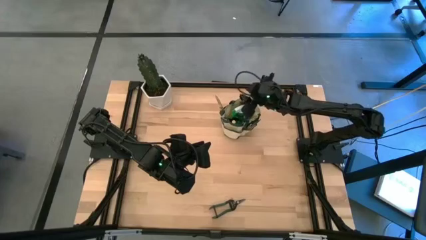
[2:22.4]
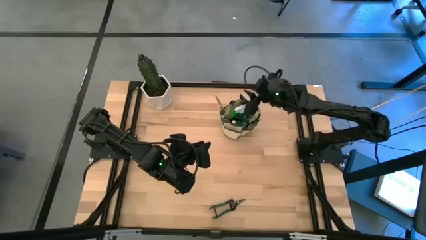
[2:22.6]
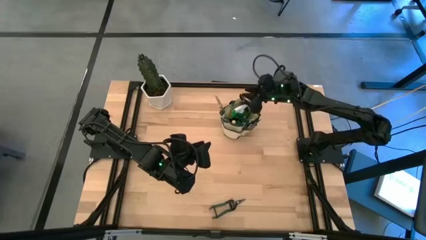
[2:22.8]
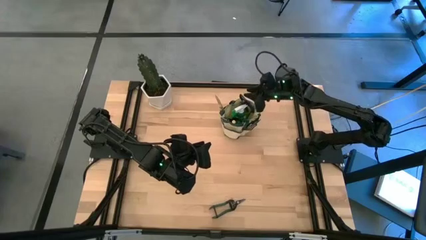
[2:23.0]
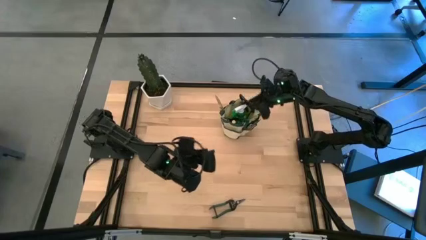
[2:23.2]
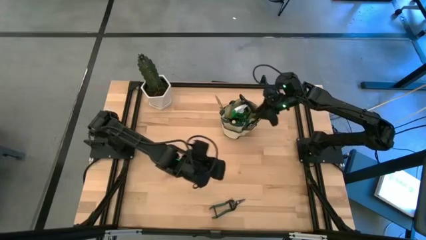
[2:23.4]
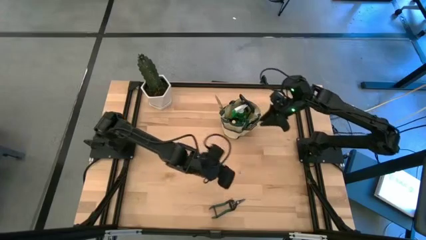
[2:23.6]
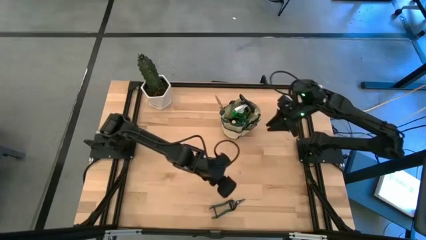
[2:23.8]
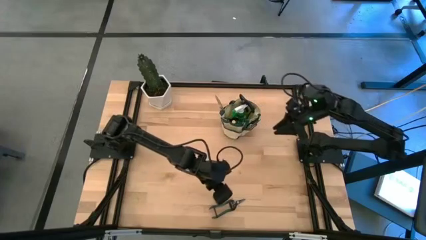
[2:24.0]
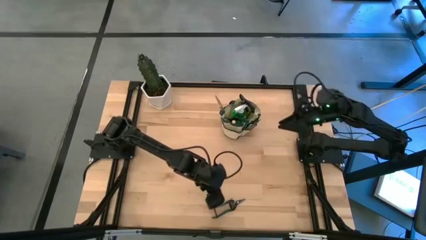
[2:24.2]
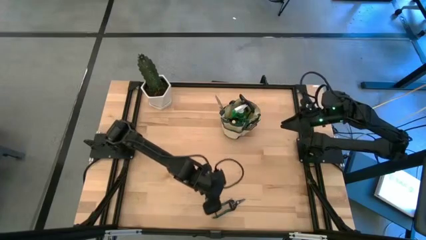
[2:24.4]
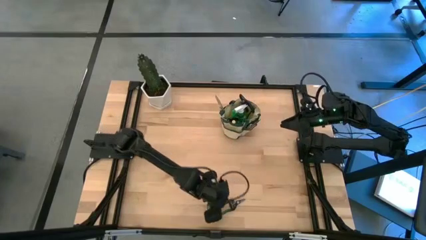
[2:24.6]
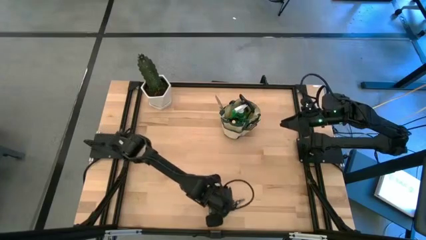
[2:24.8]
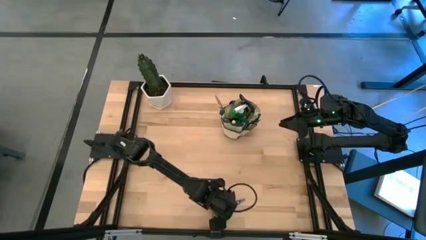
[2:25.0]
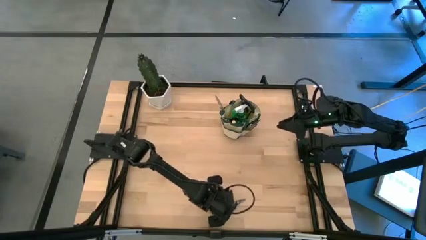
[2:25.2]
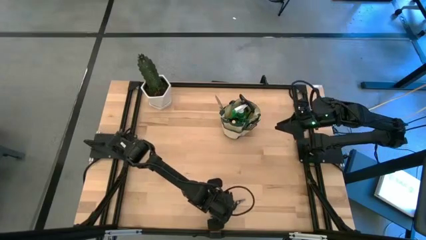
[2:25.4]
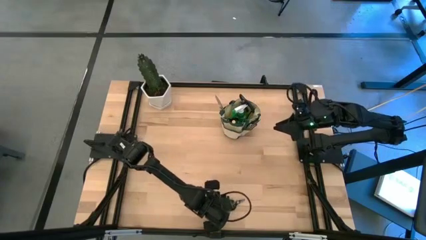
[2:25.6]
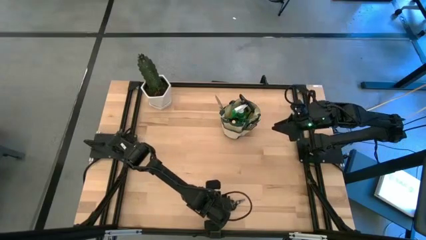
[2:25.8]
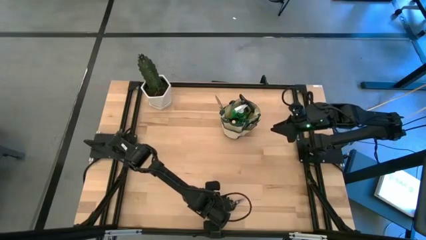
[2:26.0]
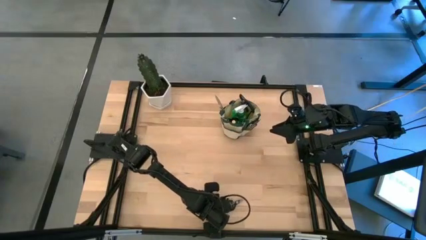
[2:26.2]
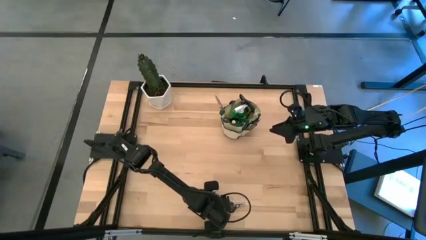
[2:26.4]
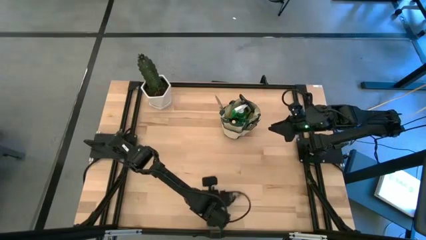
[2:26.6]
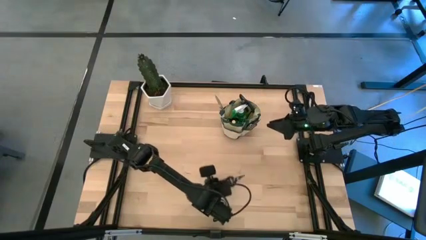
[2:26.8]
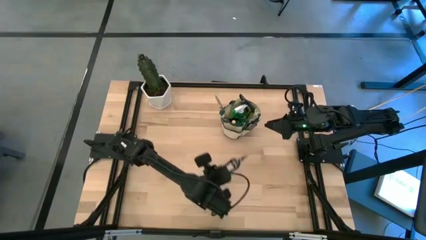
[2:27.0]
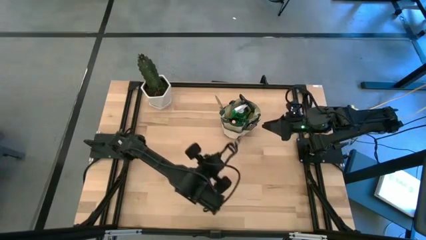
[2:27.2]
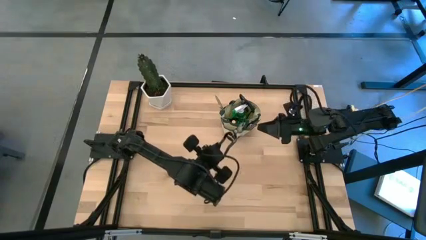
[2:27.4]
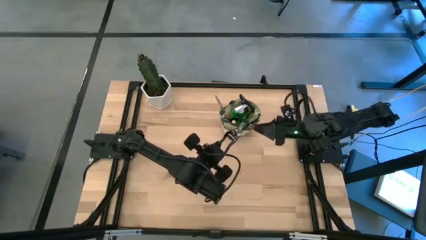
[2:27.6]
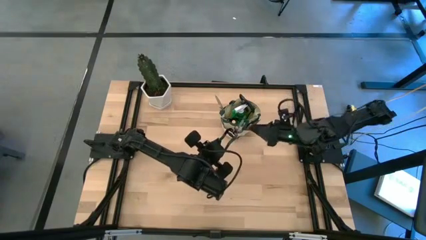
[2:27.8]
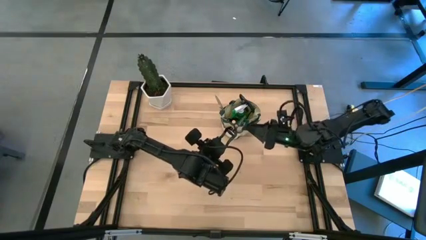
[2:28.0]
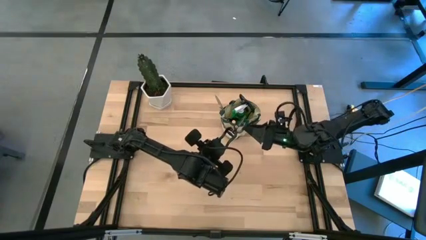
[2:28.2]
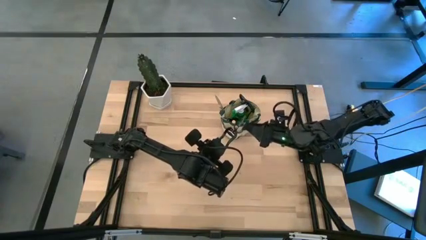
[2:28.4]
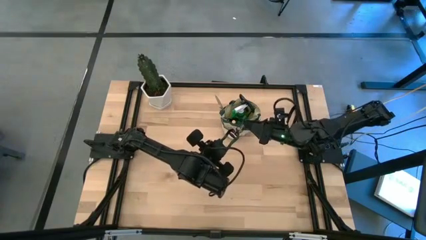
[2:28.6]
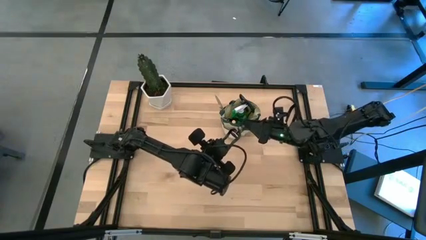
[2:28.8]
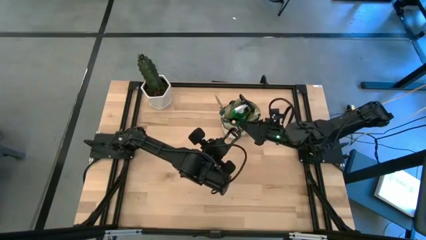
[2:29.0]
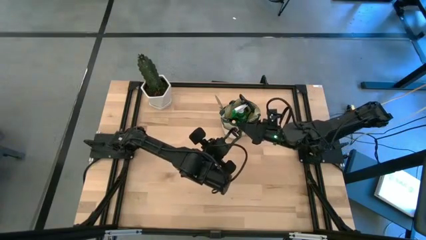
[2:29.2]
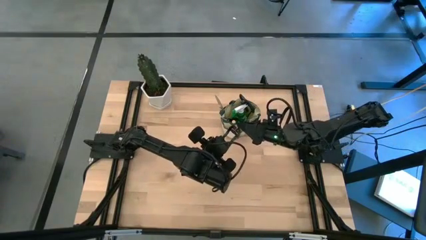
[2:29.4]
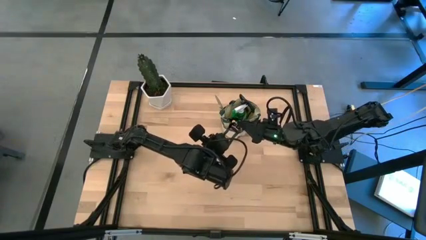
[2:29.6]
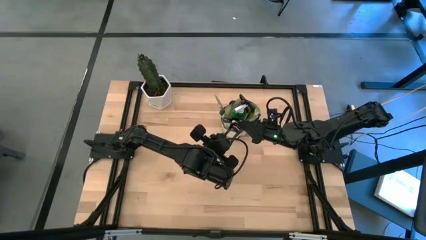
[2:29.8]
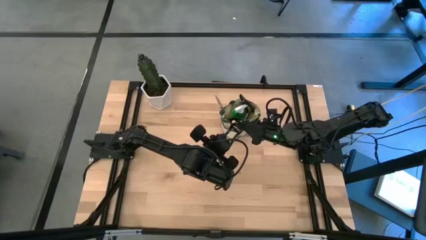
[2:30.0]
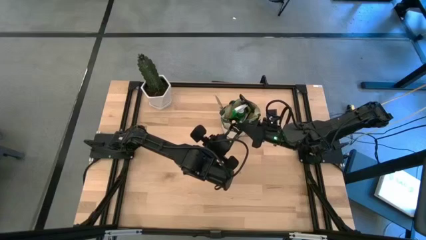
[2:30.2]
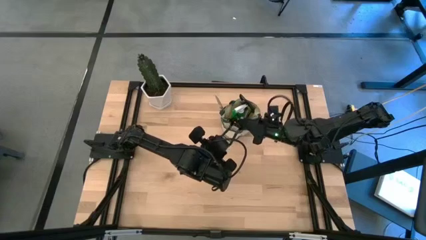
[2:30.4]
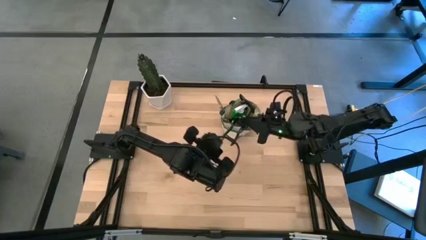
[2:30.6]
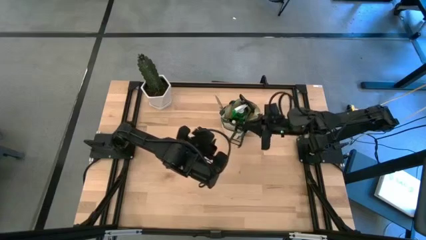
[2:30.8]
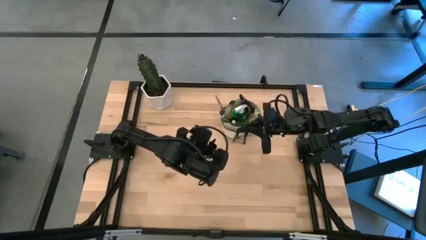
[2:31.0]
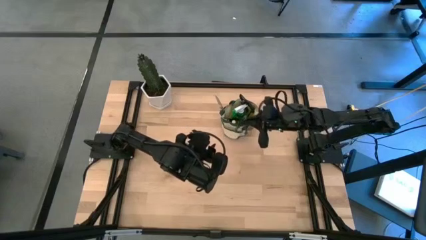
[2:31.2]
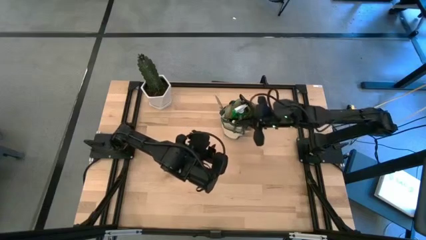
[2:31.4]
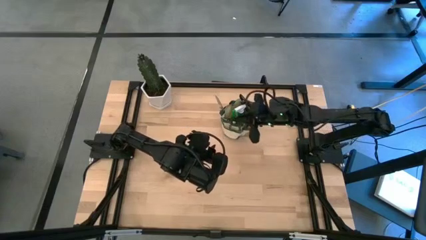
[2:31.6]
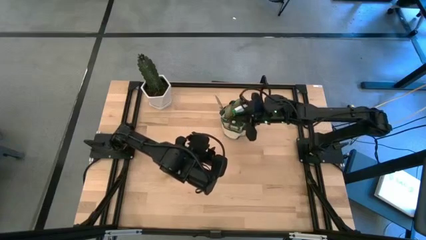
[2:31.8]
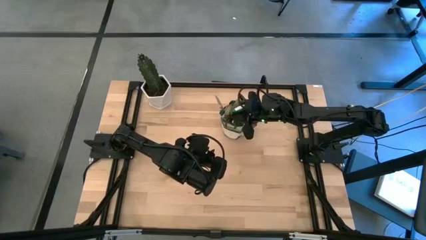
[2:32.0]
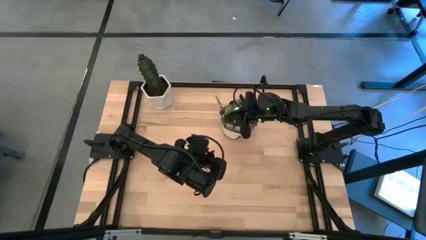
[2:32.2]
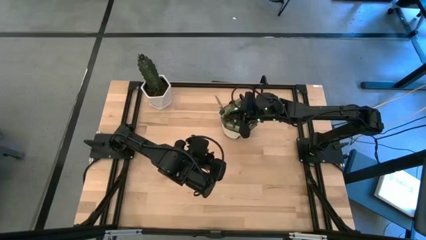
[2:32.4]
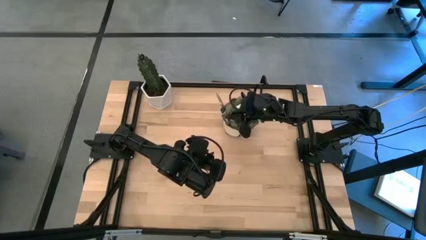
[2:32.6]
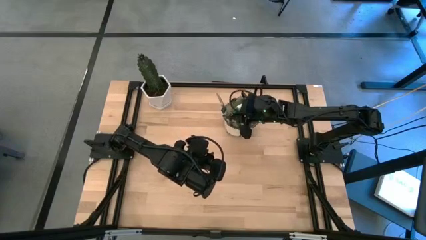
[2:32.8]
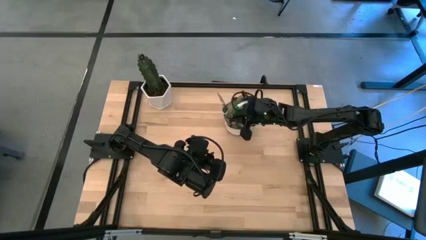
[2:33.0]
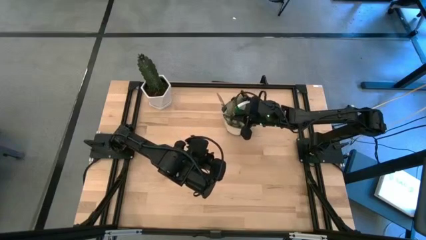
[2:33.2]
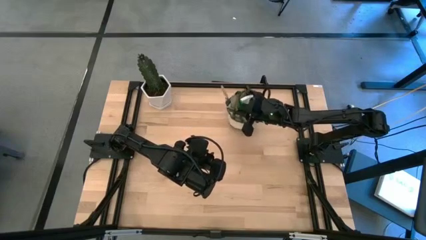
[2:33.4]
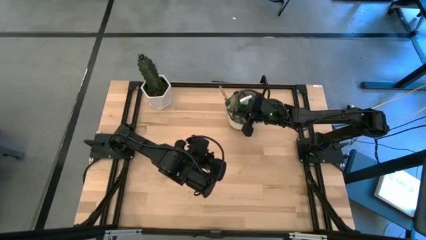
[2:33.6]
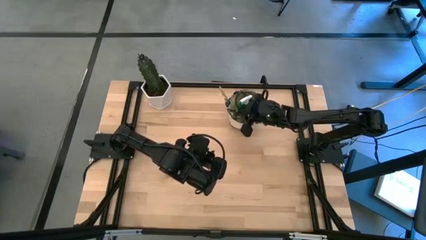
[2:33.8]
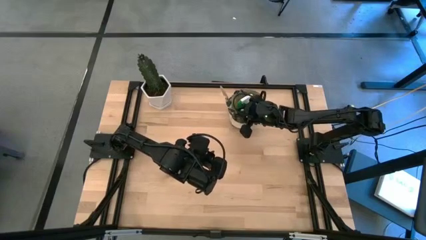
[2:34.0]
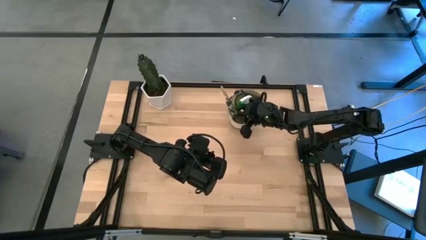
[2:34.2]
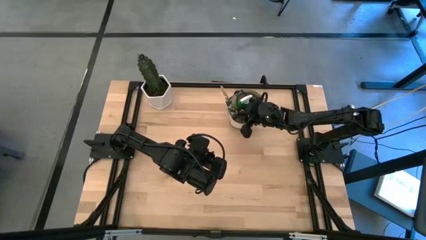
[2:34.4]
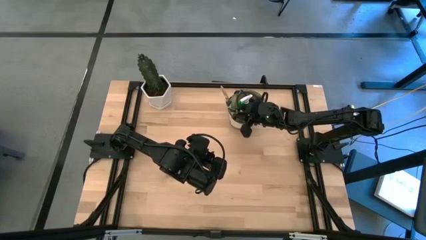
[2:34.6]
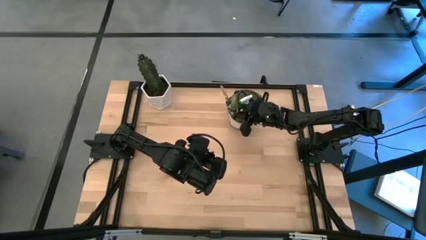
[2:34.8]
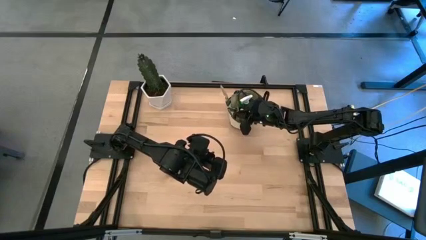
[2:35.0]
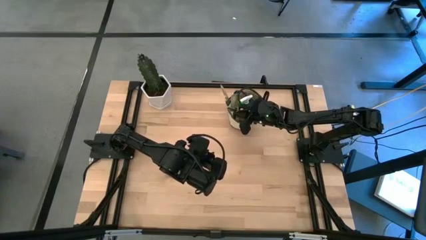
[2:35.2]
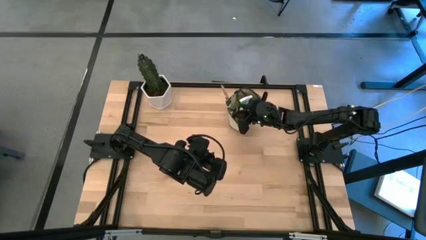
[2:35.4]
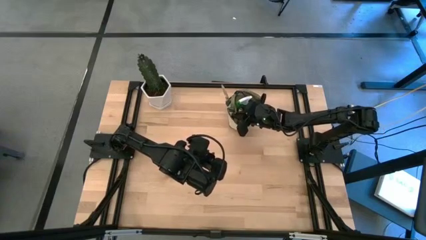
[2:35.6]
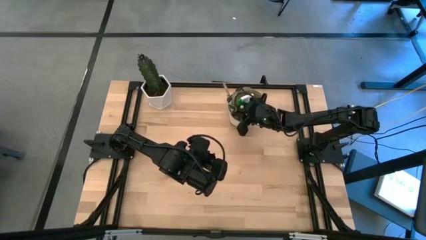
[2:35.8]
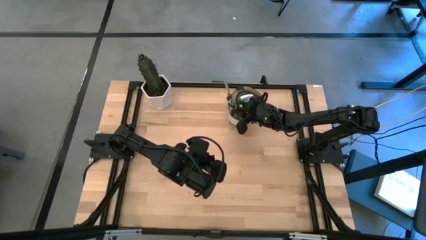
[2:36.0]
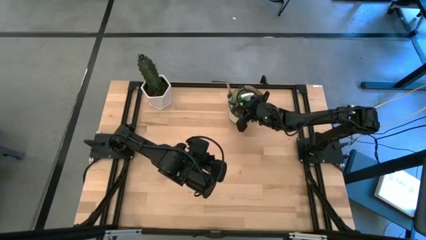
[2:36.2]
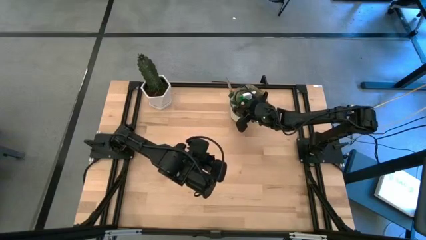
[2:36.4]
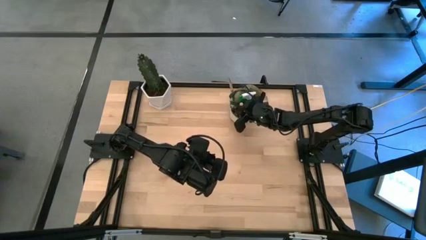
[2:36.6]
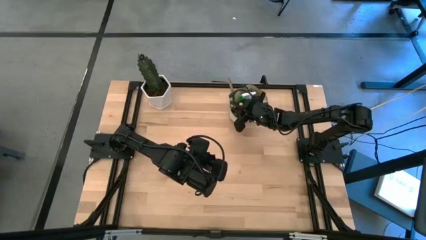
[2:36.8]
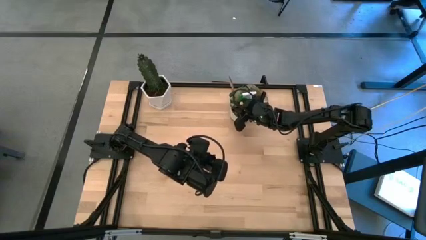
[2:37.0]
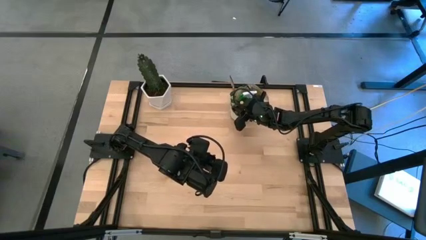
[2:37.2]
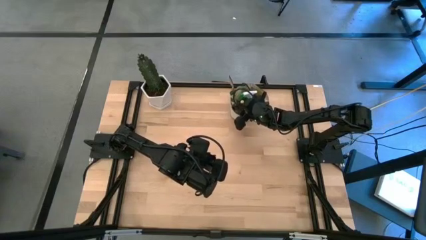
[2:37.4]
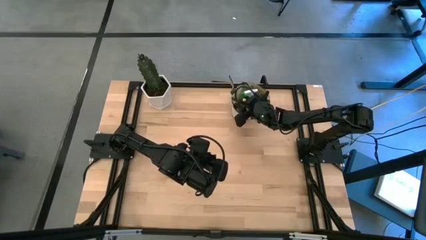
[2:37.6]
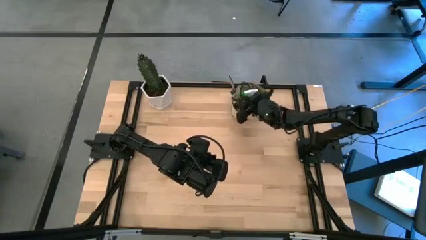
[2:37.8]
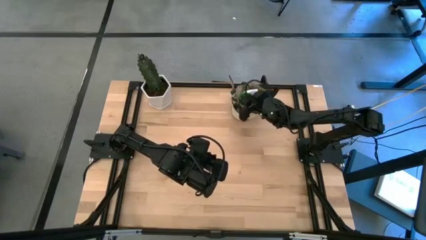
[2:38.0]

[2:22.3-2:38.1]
Task: Pick & Place Garden tools in Gardening bag
Put the shear scissor into the gardening bag

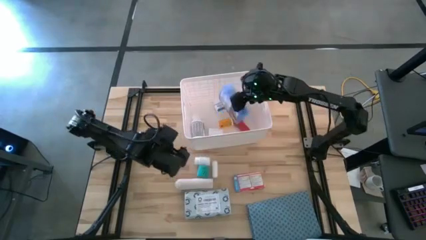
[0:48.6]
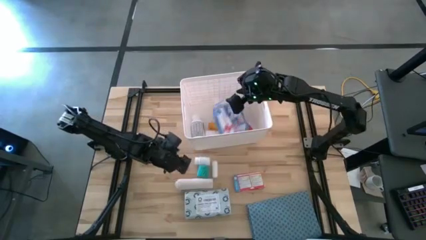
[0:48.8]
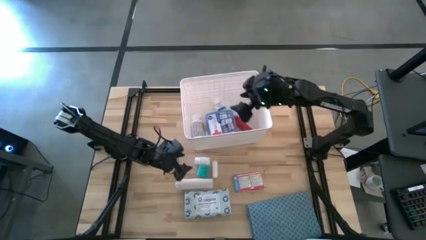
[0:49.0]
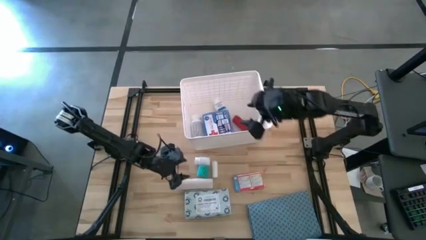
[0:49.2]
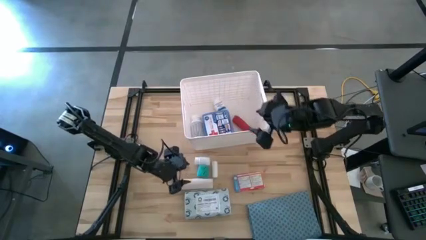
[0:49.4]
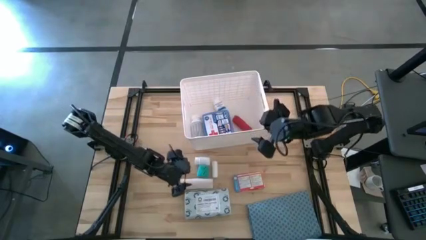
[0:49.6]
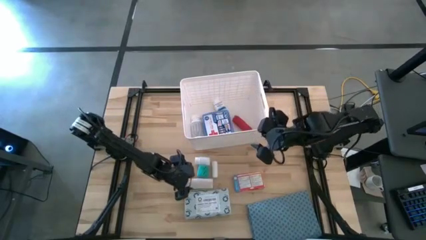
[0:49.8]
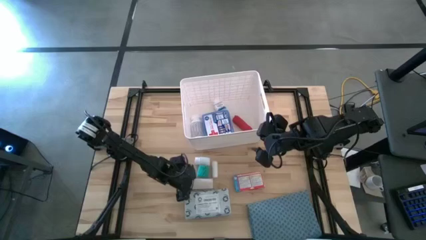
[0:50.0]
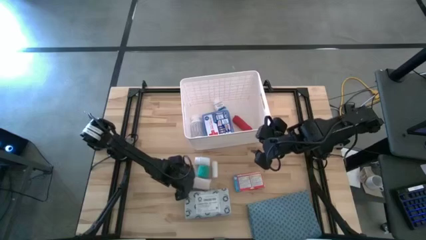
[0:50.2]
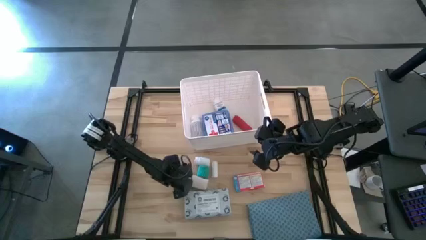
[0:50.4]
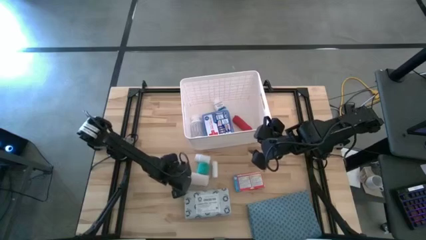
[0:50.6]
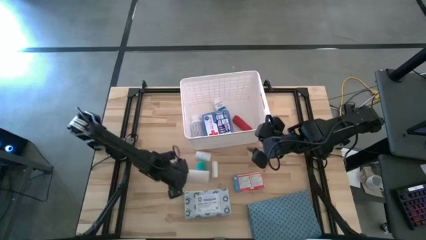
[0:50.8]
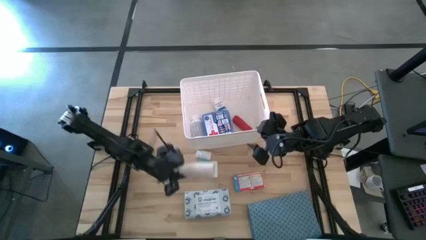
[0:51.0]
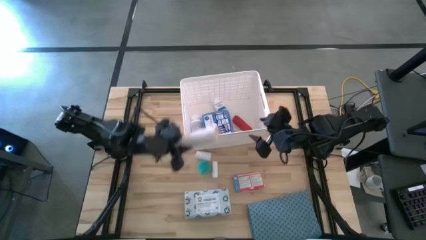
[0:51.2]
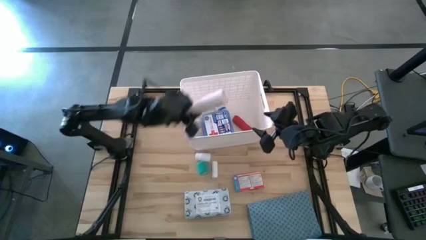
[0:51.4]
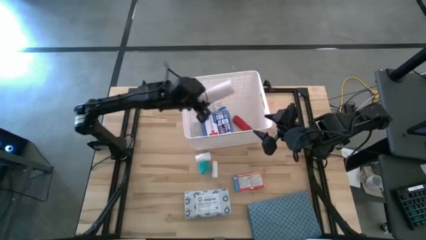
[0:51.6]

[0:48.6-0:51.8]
Task: Pick & place medical supplies in basket/bin
Put the white bandage into the white bin
